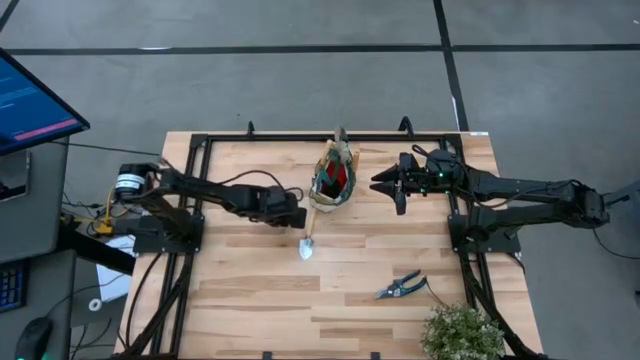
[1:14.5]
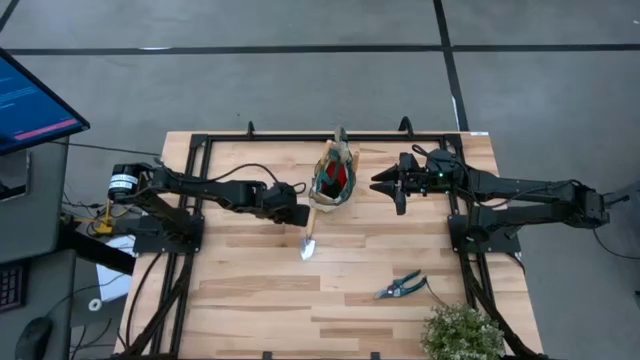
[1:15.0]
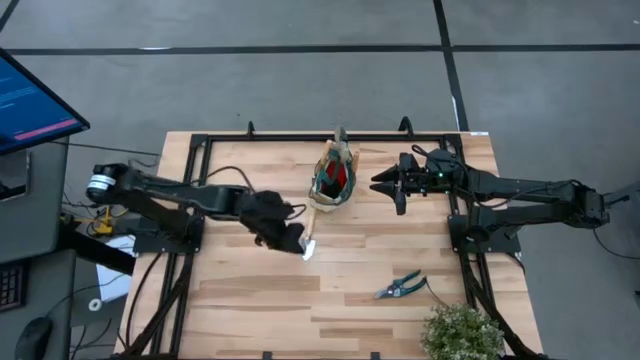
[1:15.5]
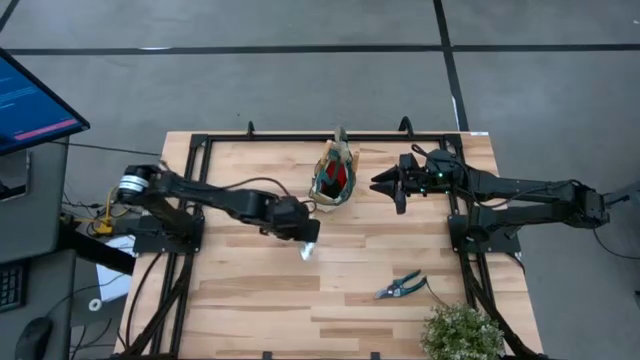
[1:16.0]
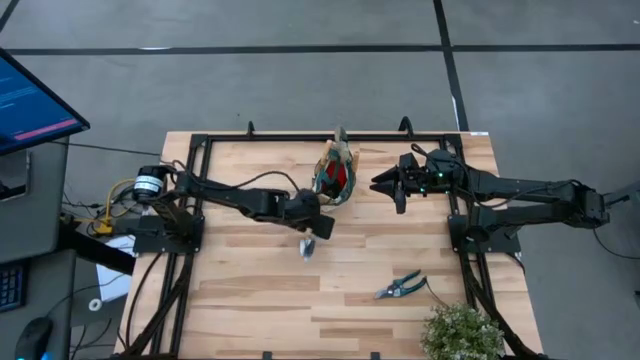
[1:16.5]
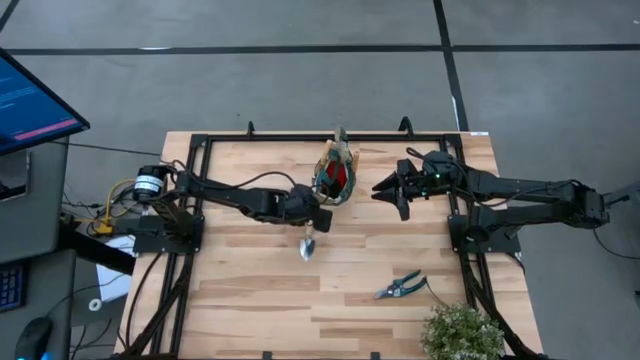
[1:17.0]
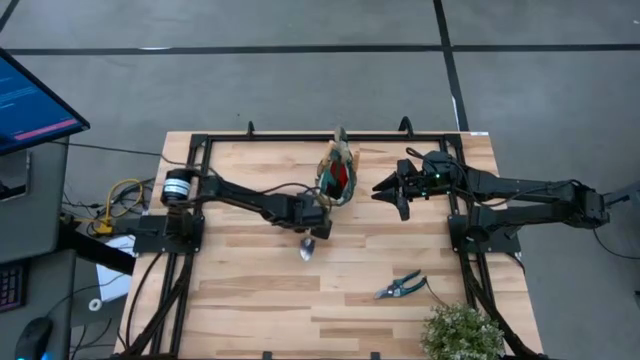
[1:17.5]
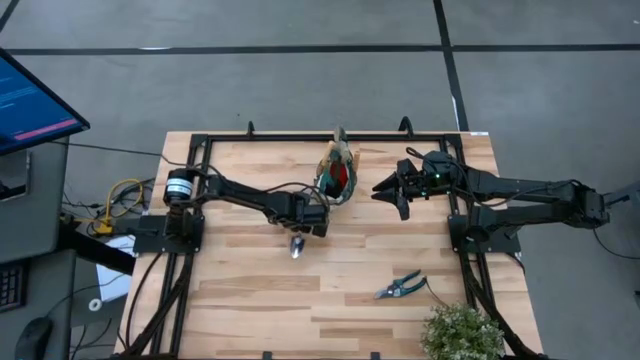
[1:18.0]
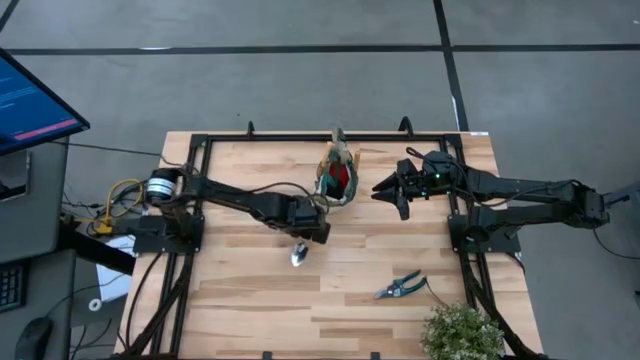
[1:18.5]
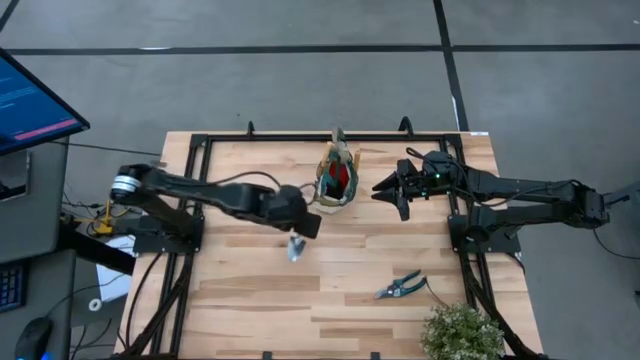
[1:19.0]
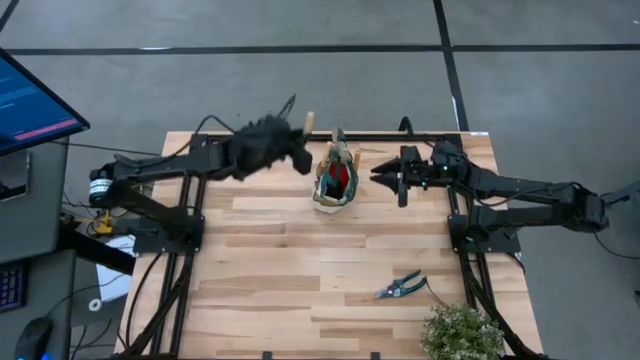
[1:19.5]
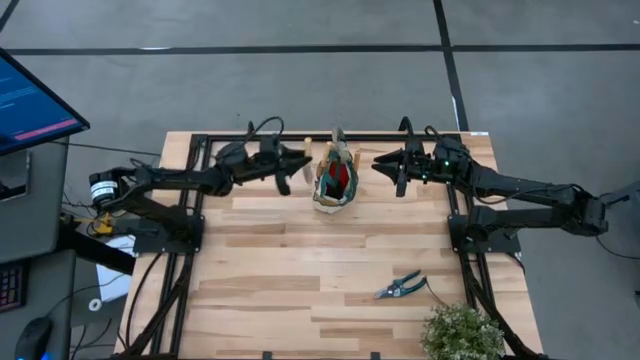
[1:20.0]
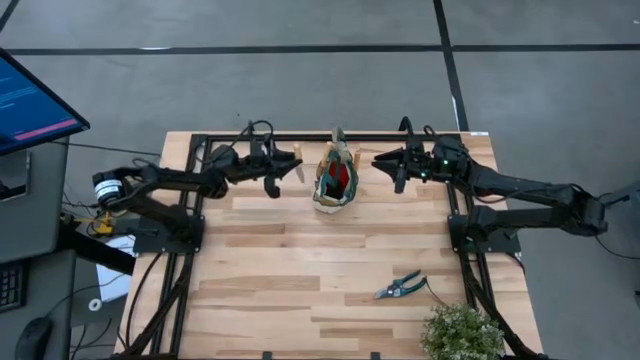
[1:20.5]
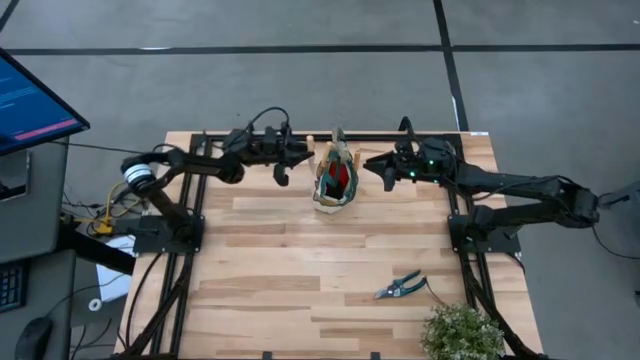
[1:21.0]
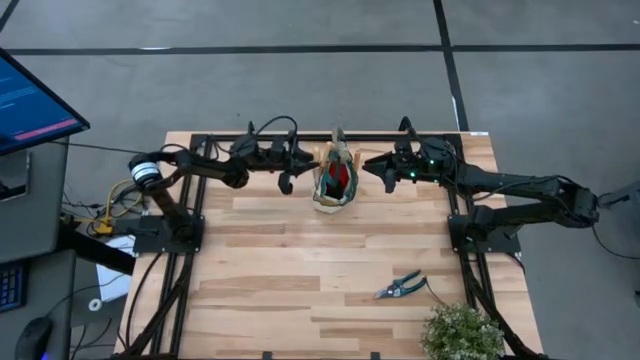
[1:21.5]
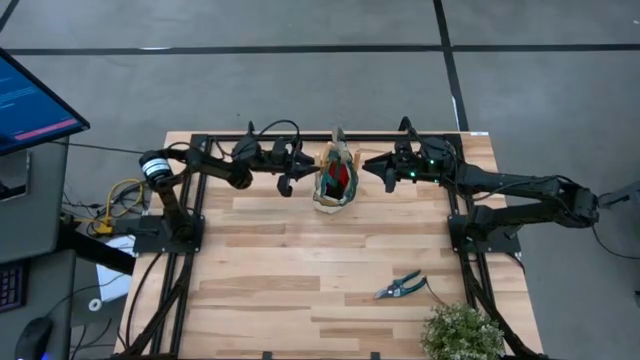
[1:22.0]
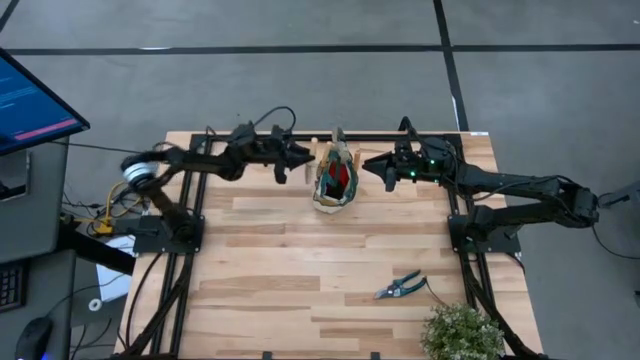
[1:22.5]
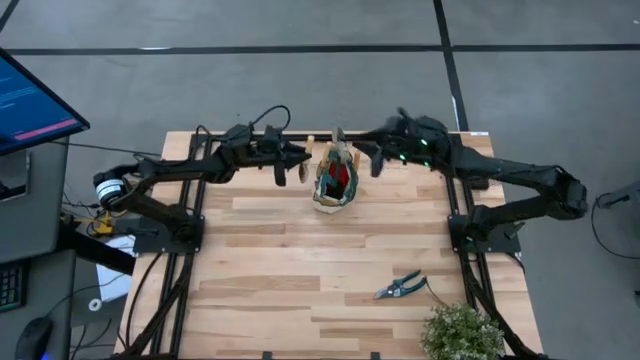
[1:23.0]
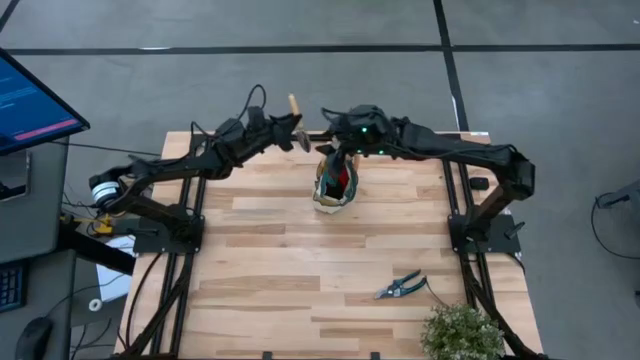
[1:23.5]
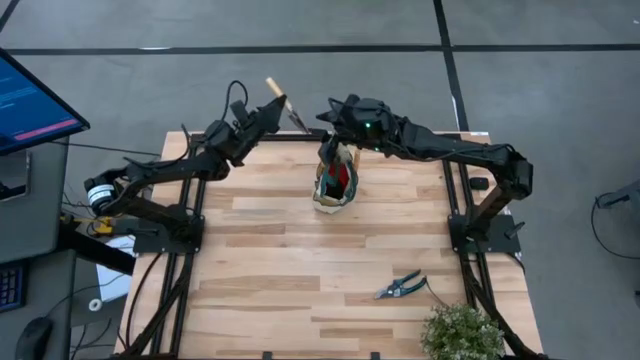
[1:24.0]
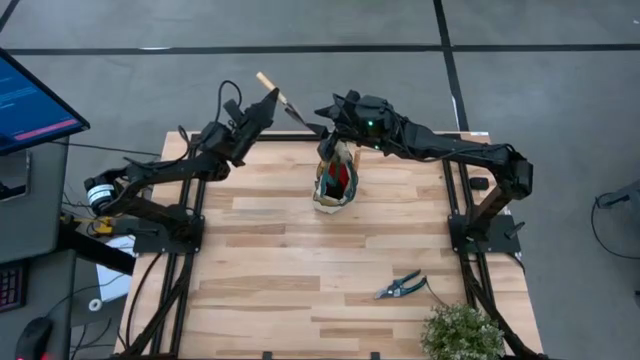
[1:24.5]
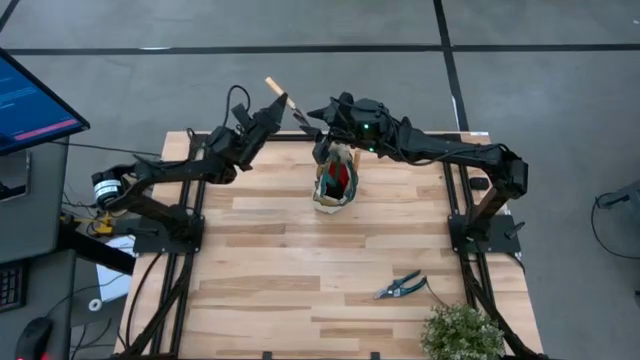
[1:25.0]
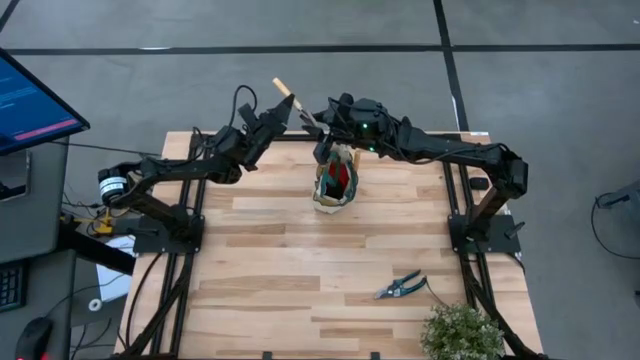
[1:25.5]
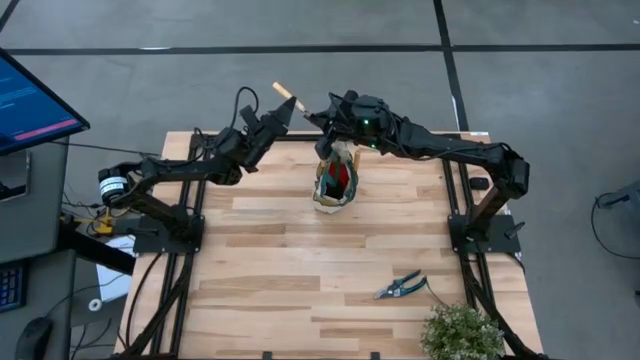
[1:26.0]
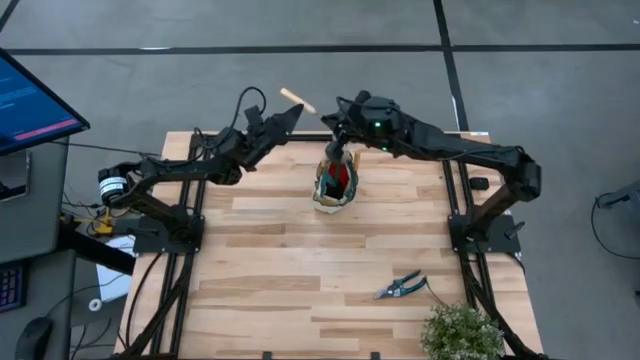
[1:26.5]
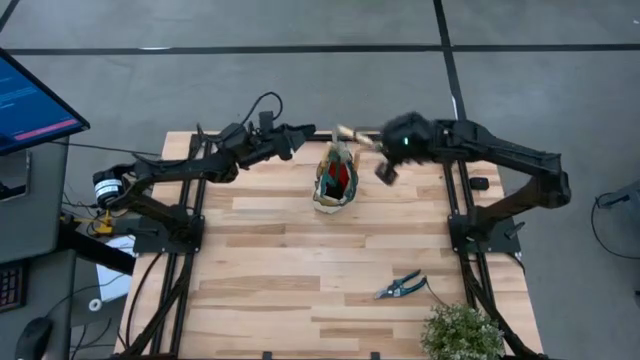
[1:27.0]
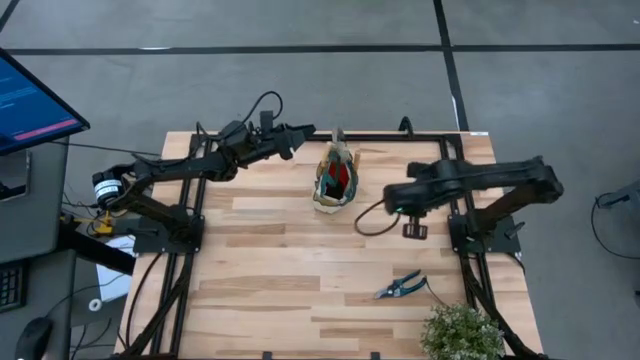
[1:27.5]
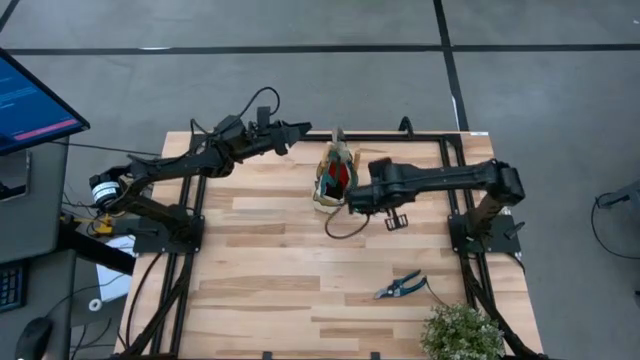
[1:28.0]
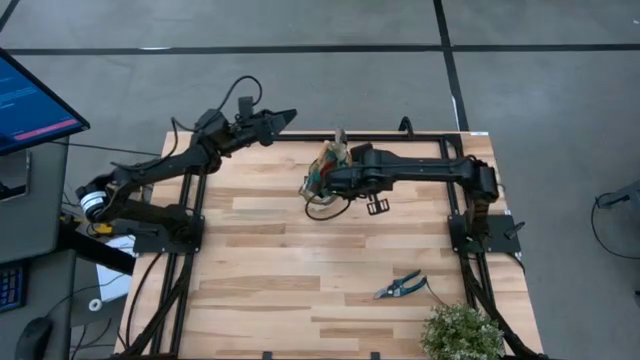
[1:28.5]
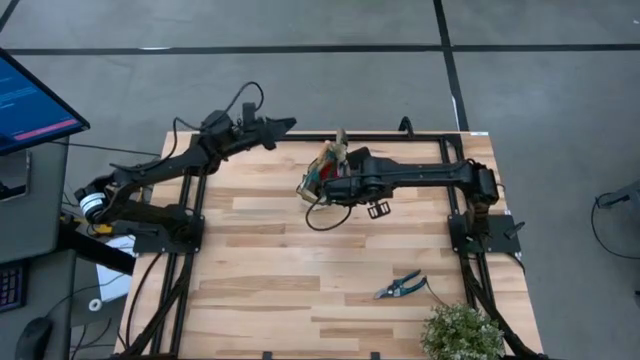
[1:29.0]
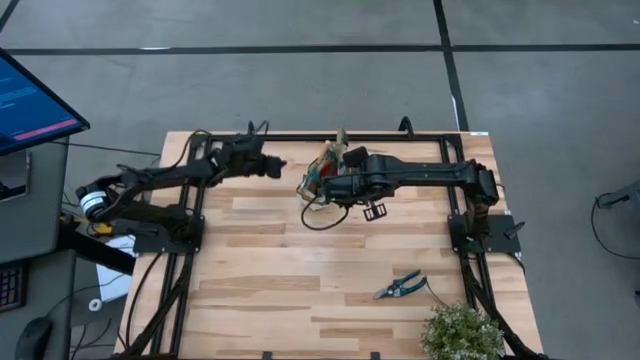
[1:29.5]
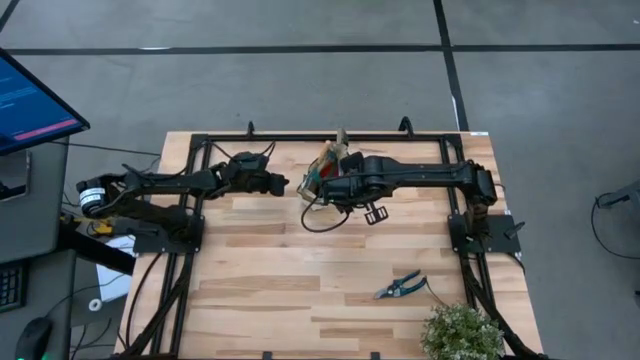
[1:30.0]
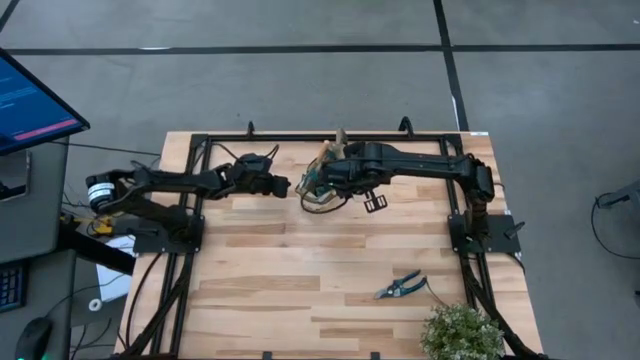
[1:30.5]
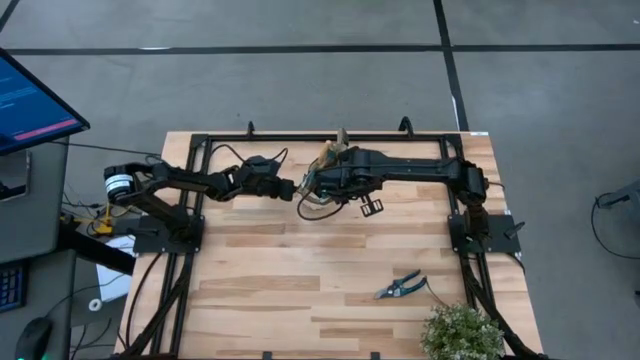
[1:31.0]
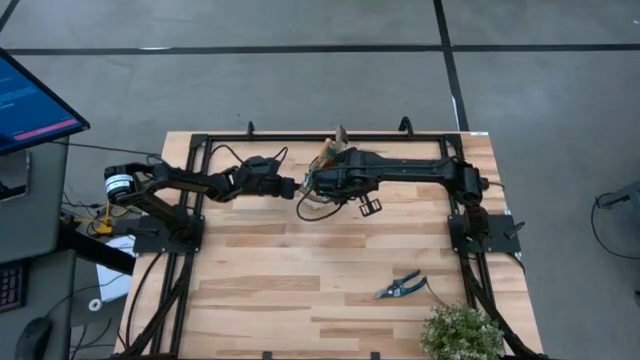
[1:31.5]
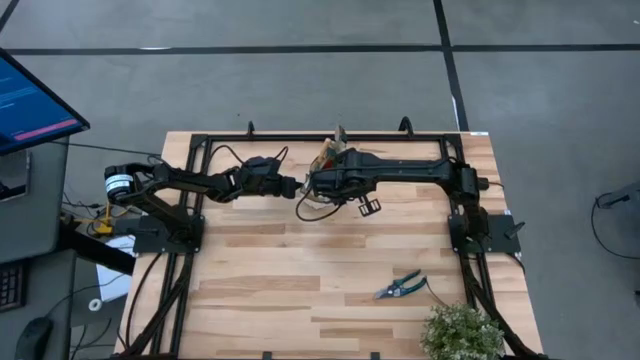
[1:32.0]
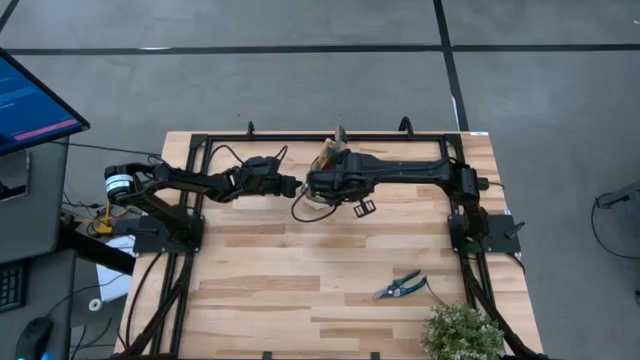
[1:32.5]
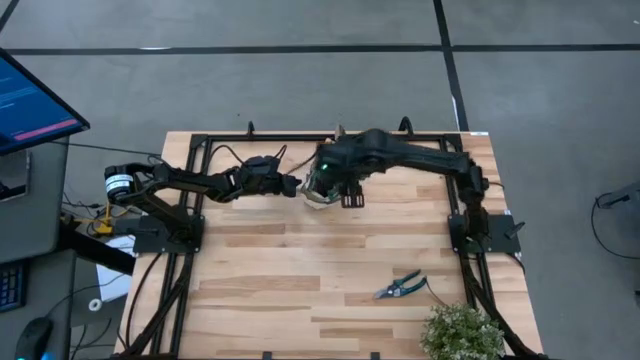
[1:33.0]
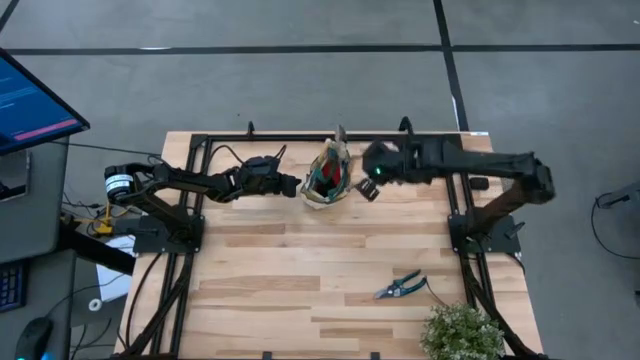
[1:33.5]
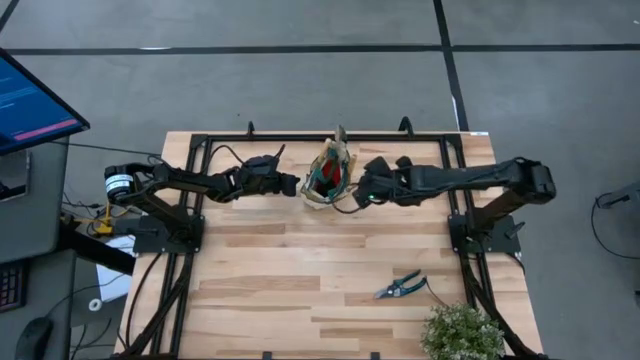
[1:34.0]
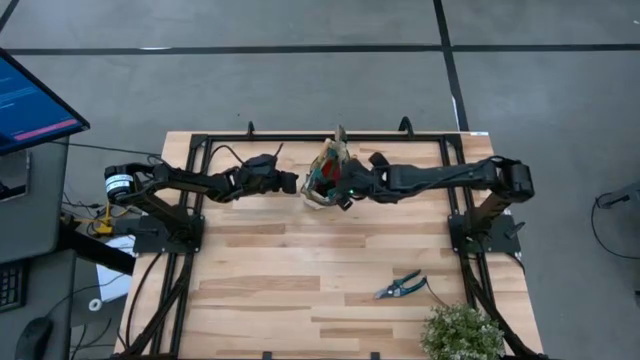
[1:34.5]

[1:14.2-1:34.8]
Task: Pick & Place Garden tools in Gardening bag
Put the brown trowel into the gardening bag

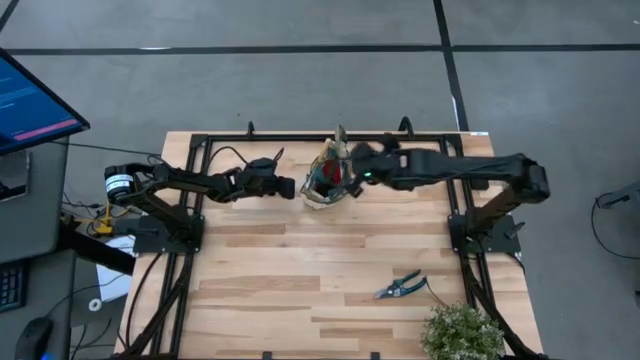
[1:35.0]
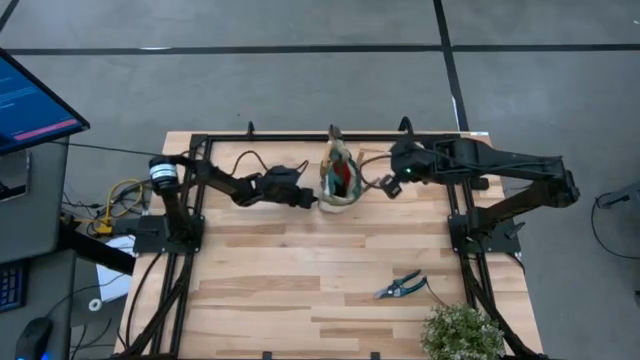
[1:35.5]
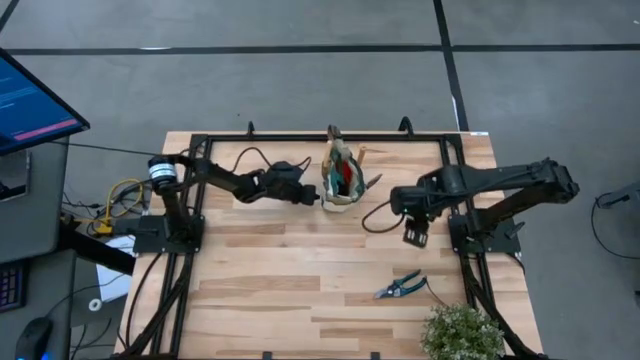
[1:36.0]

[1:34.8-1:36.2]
Adjust the gardening bag
